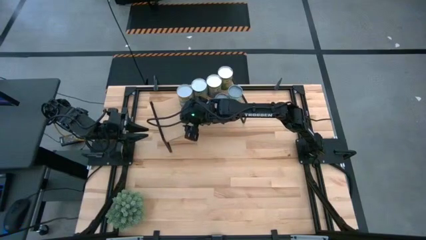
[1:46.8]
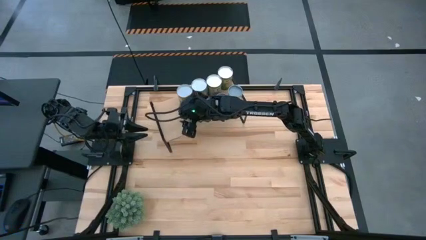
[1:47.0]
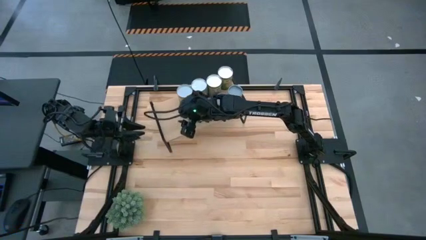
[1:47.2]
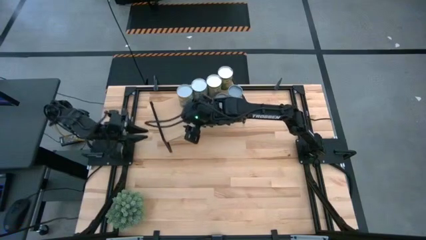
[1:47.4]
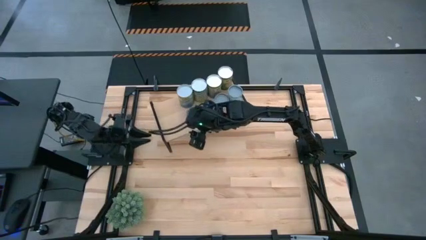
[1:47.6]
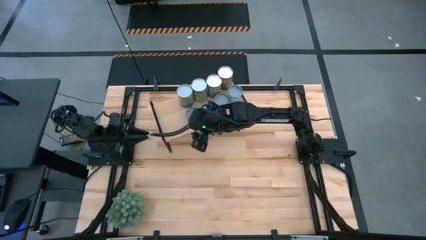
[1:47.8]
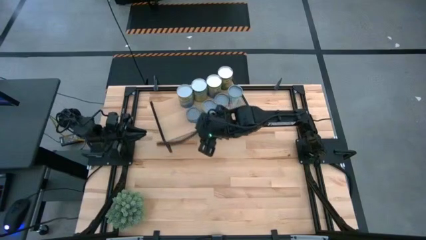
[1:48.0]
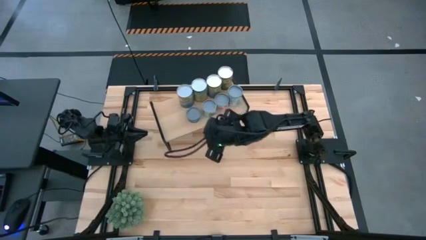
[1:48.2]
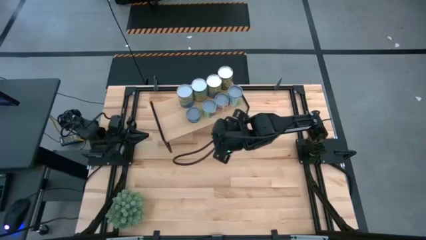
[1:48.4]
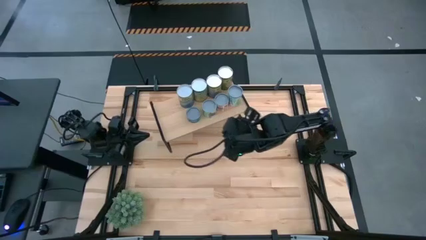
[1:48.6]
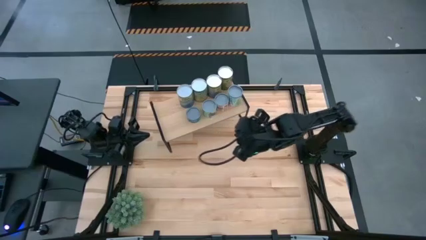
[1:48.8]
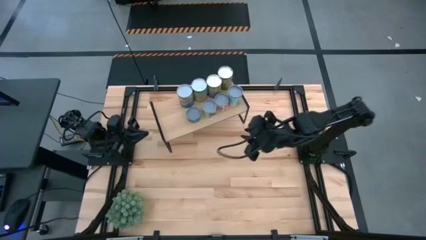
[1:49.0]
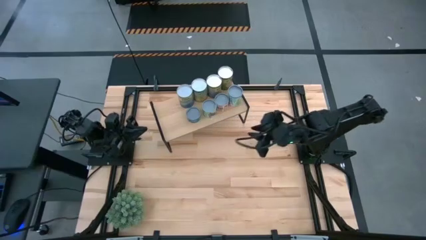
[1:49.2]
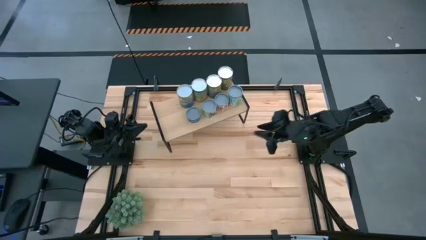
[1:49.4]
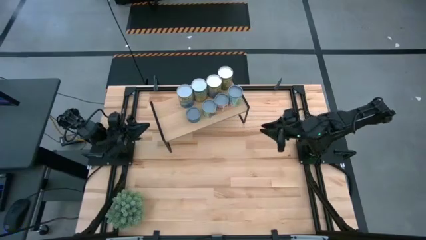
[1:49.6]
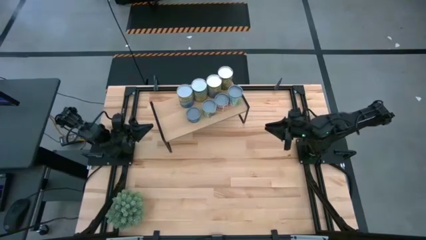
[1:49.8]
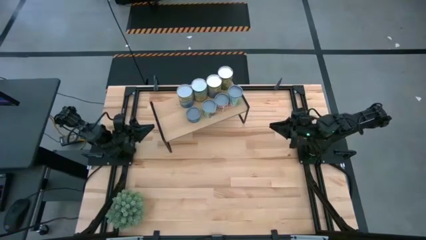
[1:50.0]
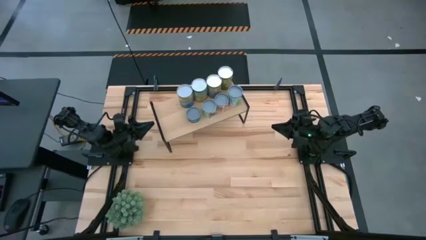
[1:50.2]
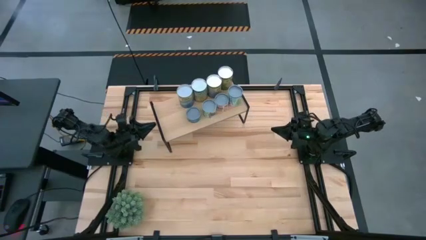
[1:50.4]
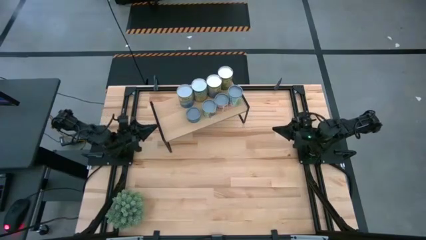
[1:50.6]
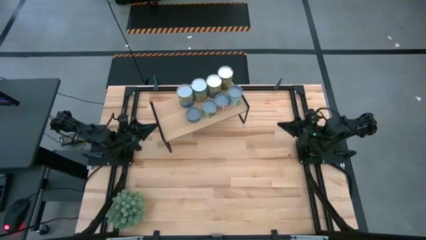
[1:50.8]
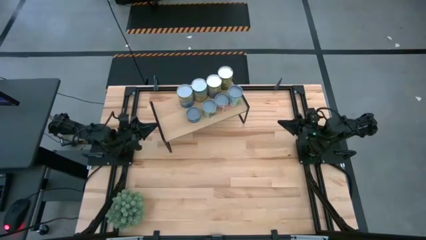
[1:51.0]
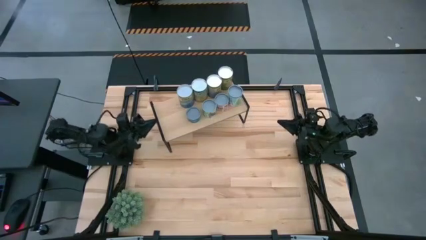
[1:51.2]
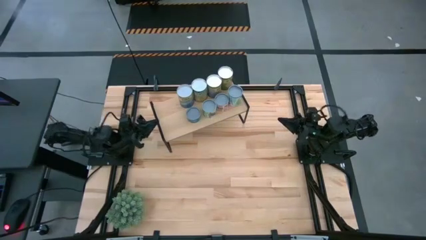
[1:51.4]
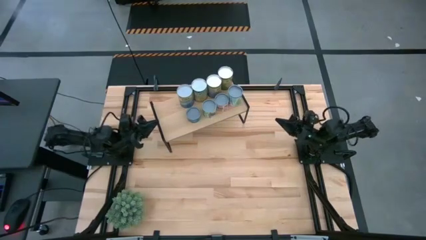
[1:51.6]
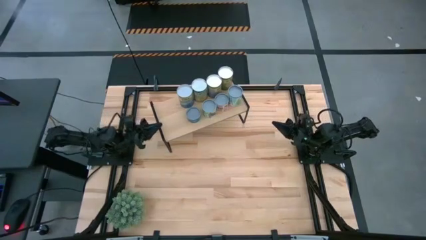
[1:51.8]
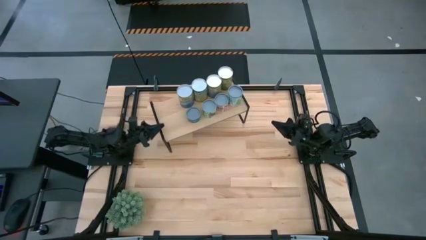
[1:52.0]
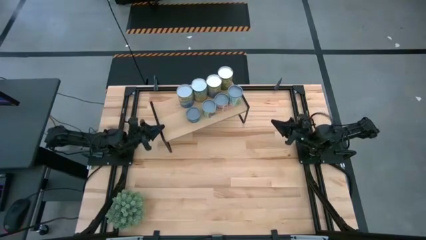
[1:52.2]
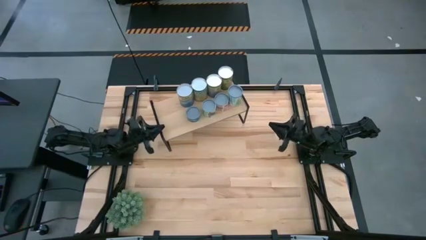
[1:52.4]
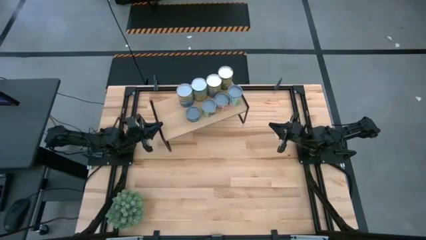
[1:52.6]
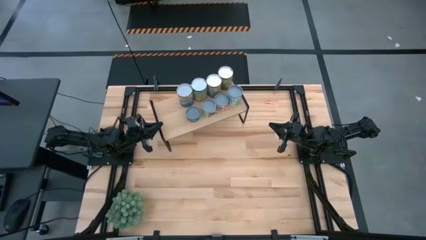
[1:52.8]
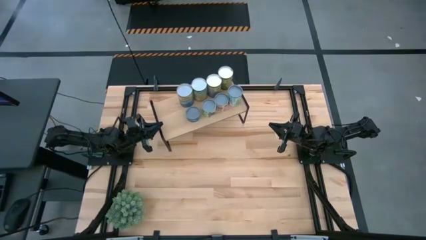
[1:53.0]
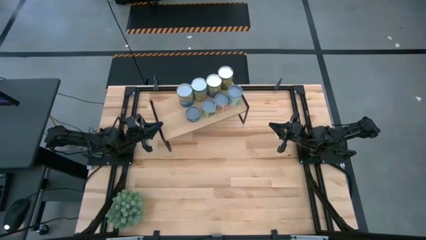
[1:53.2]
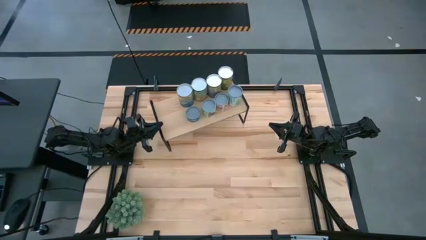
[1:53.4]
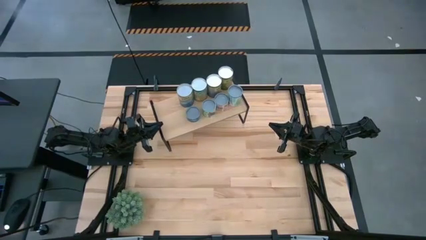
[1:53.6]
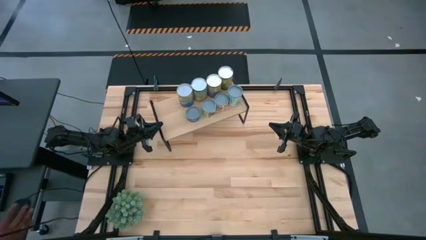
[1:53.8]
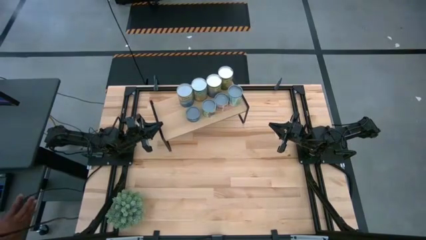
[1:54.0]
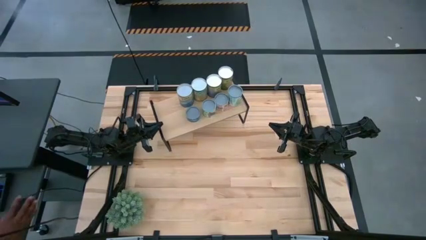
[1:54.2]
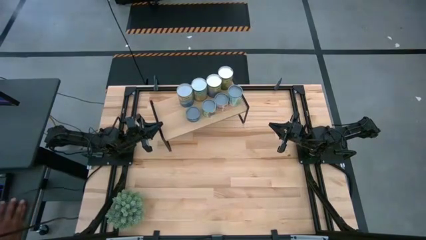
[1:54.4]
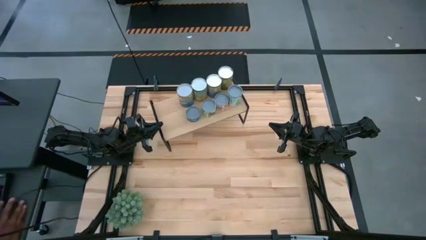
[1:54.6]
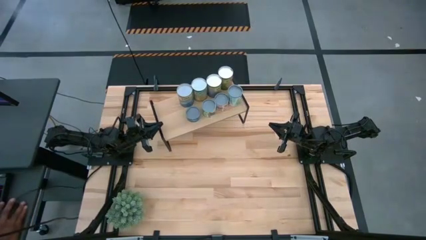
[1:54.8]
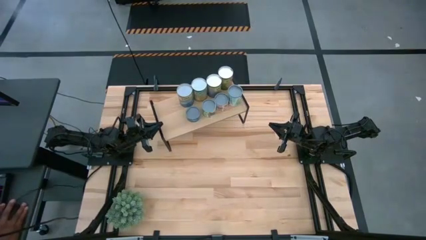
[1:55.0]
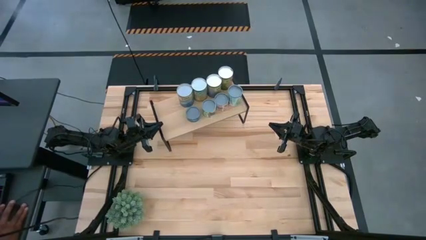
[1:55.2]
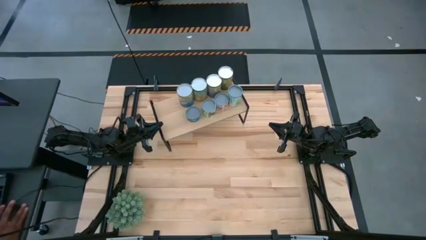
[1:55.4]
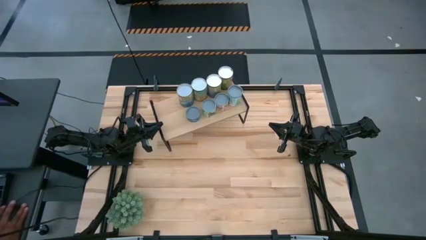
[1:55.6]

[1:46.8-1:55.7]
Task: Pick and place cans onto a shelf
Return to Home Position

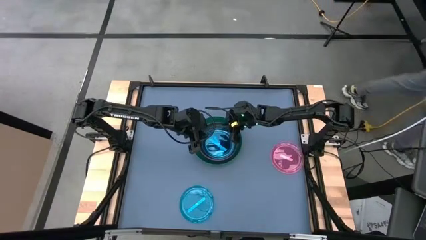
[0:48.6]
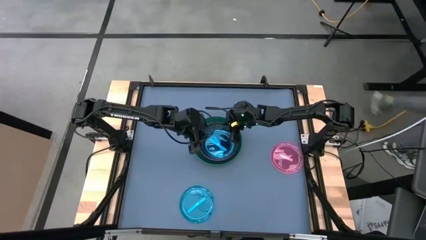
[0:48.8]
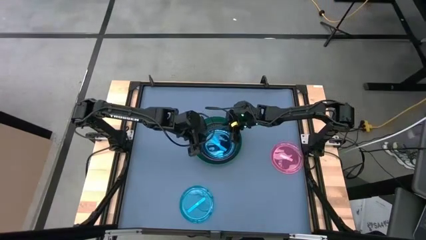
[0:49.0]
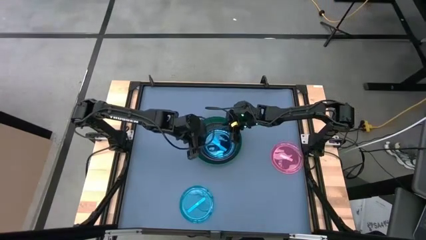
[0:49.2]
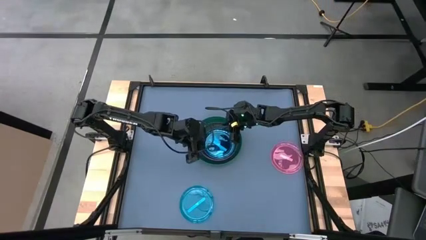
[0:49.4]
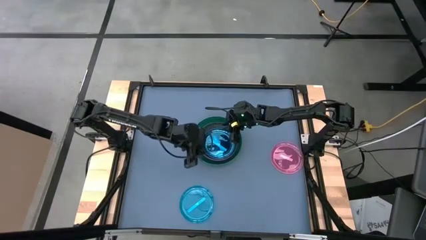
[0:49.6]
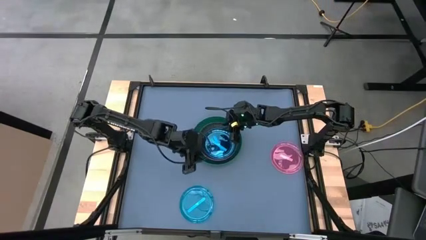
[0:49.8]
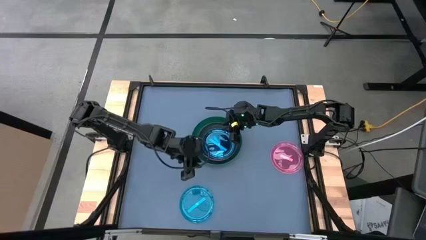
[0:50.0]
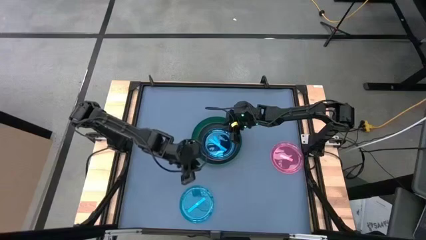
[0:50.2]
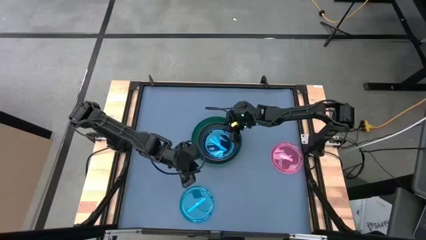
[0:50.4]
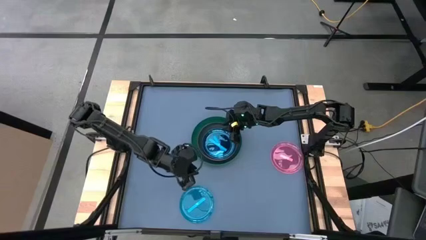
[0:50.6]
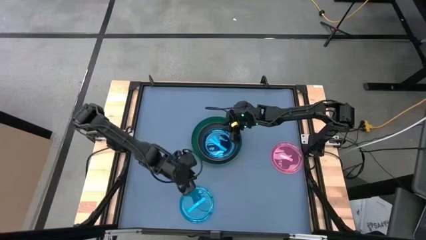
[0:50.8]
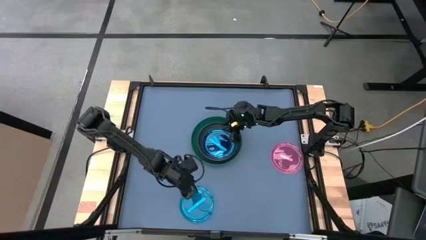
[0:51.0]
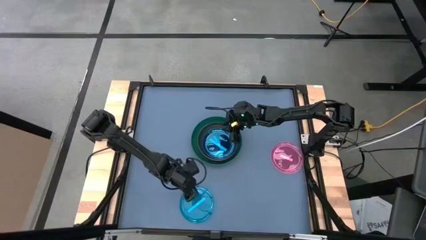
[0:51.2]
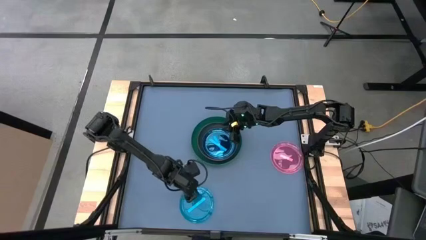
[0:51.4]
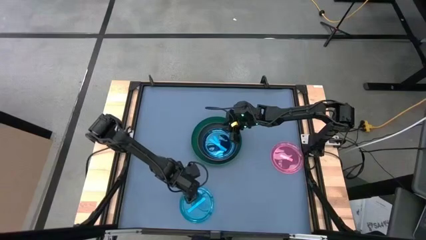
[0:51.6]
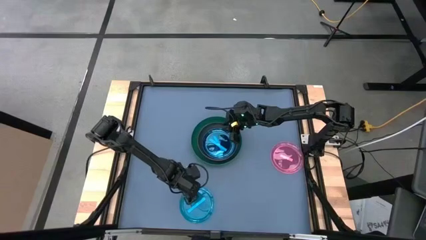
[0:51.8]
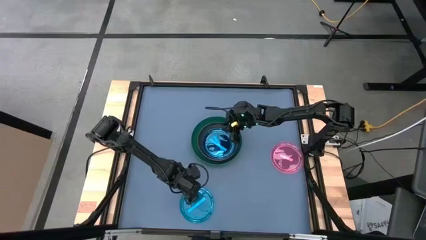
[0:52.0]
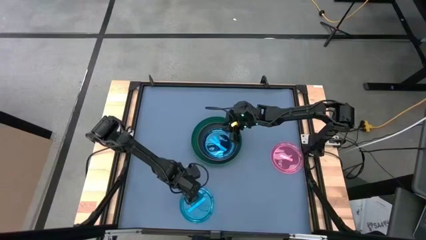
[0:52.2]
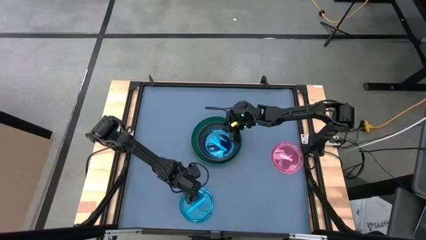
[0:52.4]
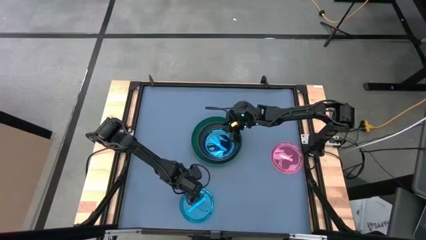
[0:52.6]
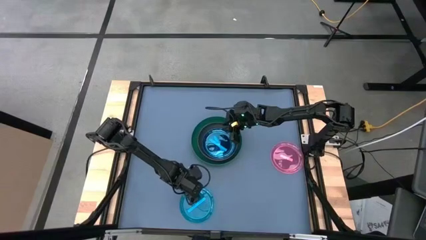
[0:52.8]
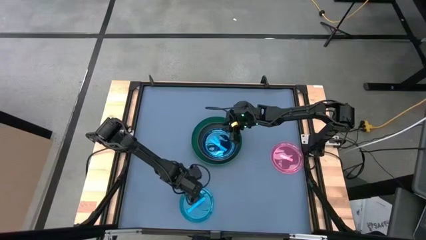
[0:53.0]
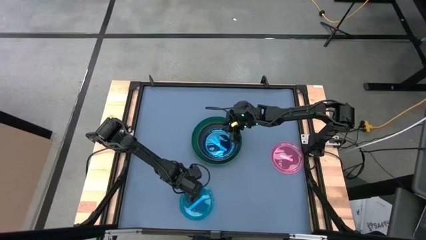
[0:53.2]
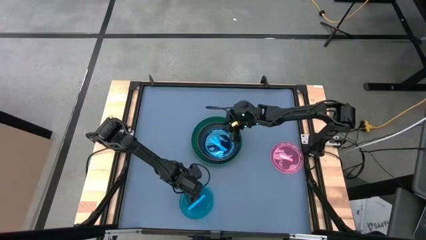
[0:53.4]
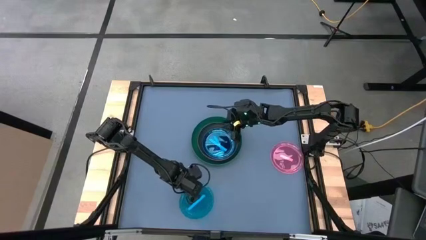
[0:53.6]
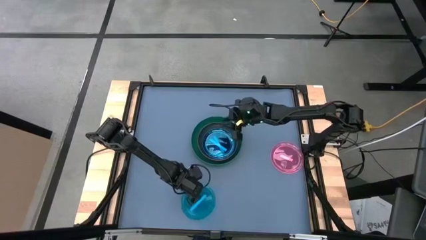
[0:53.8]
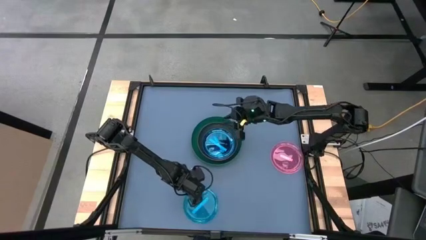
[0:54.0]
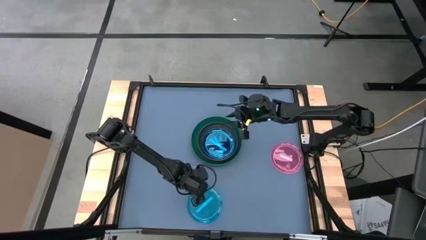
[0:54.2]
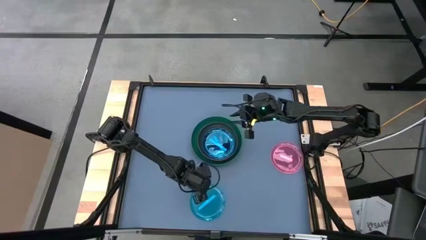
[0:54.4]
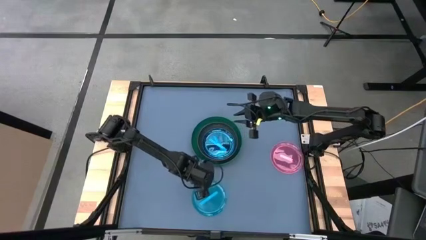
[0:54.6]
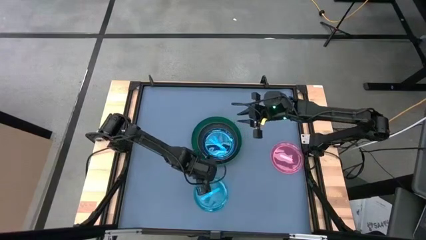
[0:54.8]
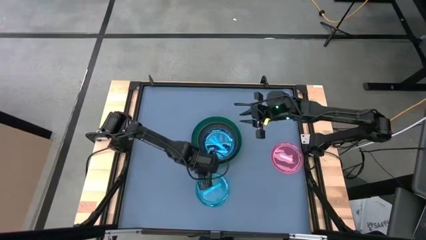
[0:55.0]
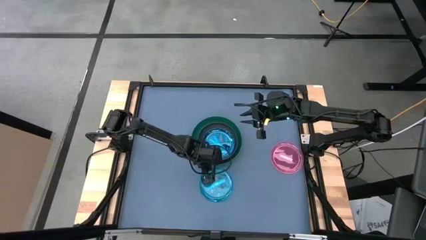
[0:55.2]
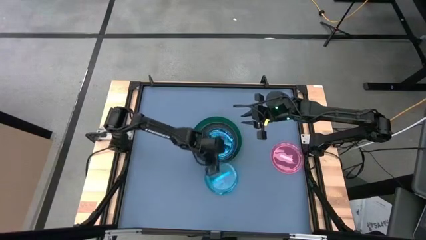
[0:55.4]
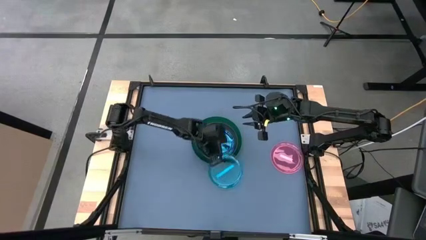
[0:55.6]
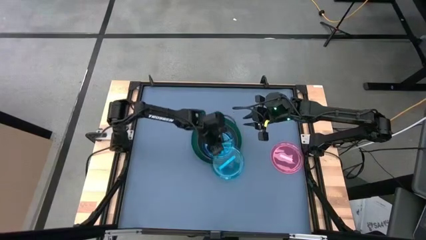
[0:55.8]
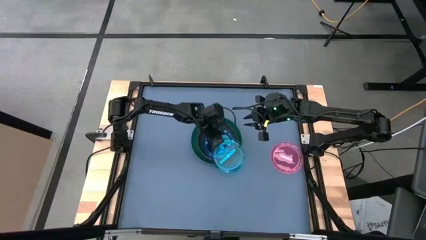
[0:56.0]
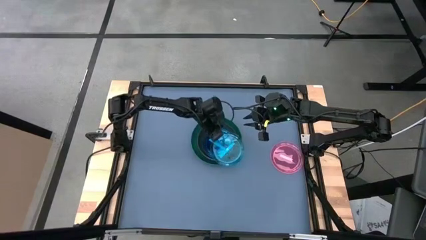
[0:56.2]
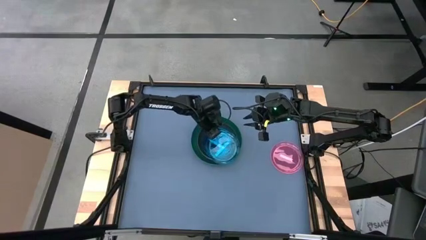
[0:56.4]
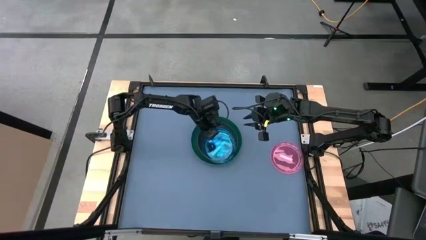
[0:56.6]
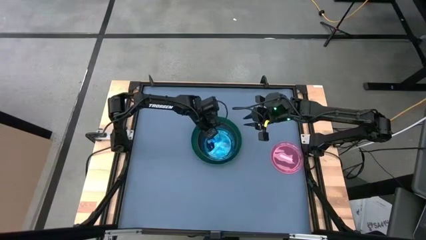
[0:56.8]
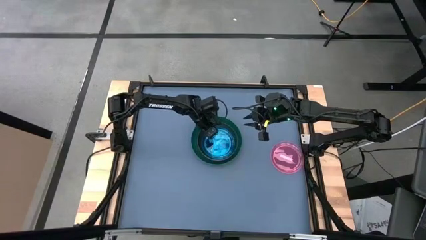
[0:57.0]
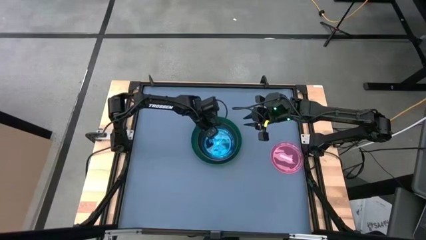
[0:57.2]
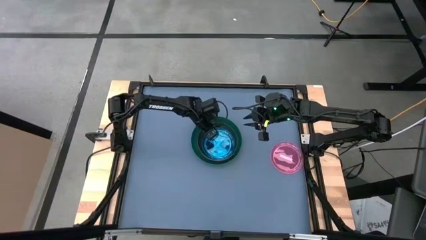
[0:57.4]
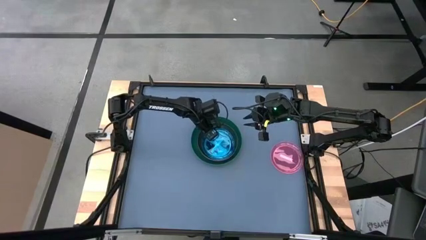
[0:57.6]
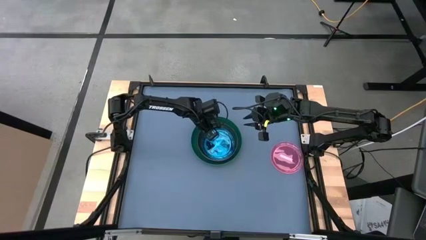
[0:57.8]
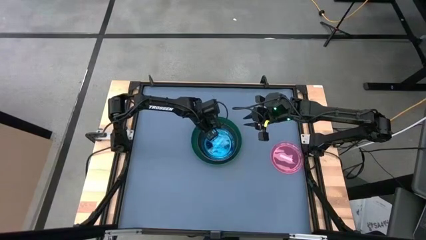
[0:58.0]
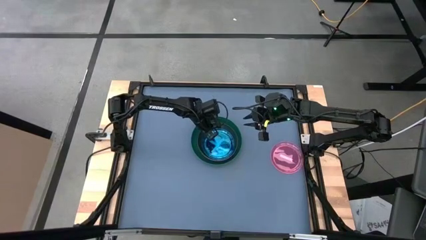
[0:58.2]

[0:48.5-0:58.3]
Task: Stack plastic plates
Stack the bottom blue plate on top of the top blue plate
